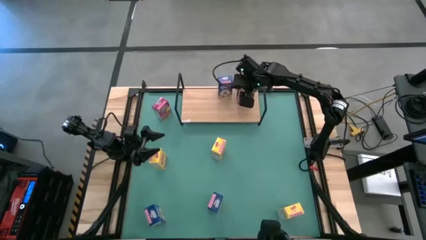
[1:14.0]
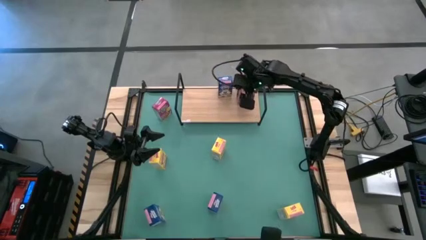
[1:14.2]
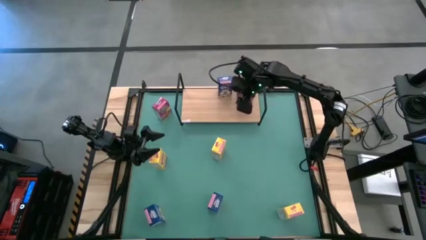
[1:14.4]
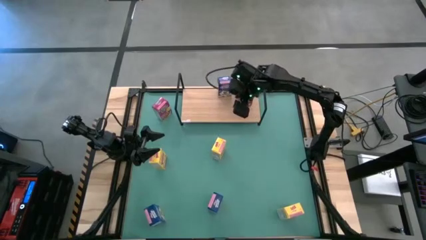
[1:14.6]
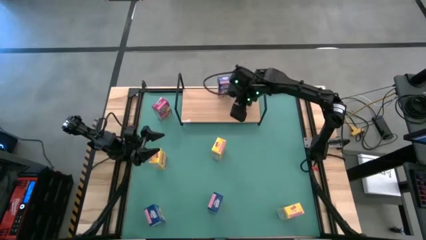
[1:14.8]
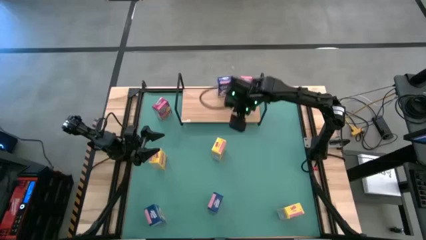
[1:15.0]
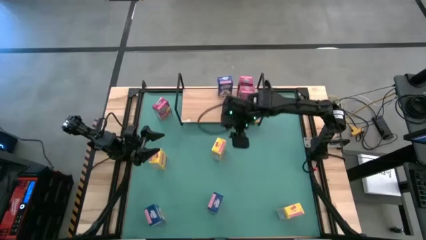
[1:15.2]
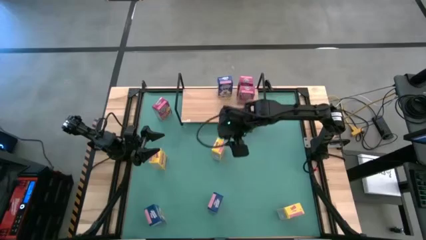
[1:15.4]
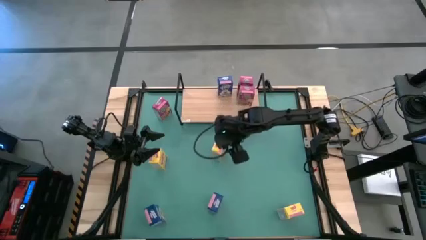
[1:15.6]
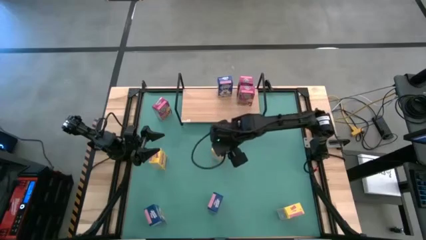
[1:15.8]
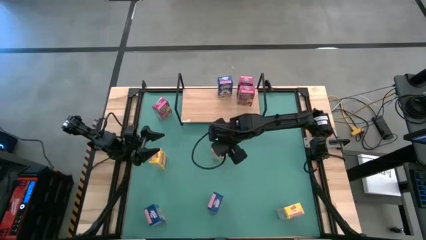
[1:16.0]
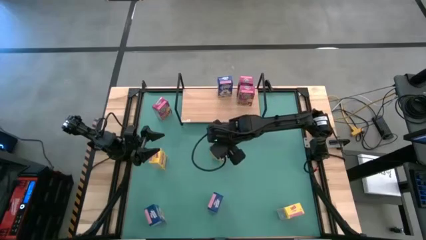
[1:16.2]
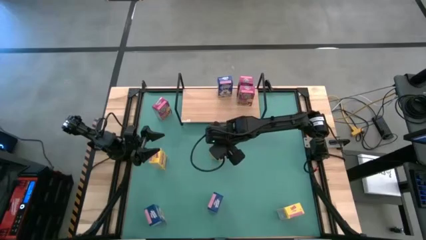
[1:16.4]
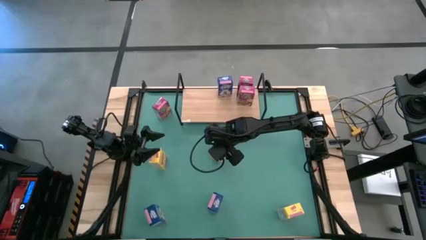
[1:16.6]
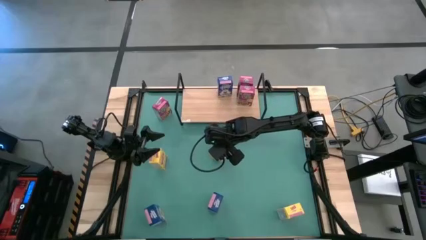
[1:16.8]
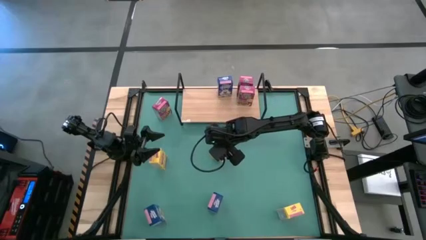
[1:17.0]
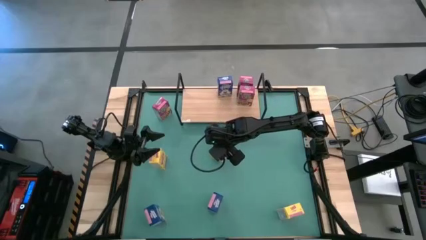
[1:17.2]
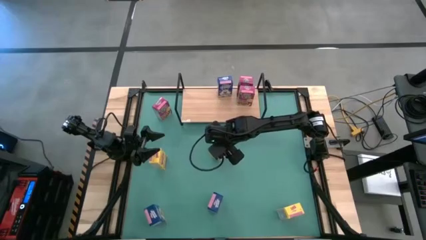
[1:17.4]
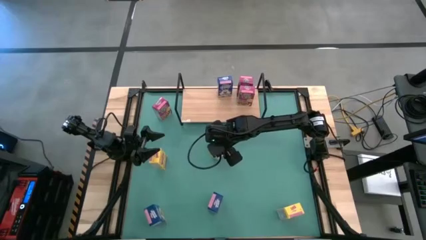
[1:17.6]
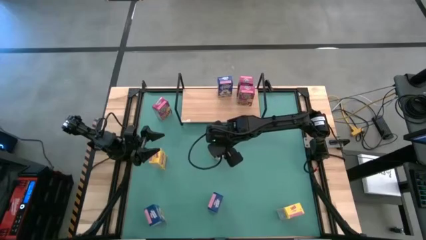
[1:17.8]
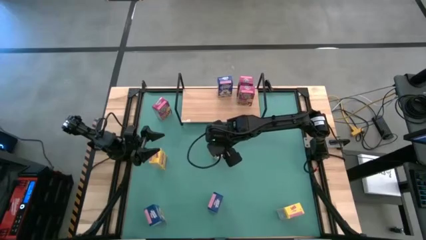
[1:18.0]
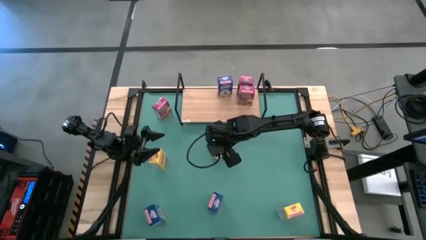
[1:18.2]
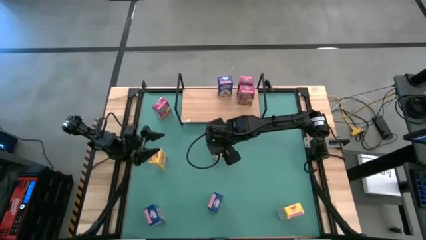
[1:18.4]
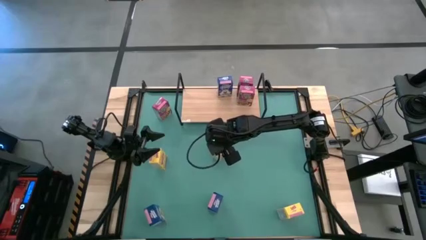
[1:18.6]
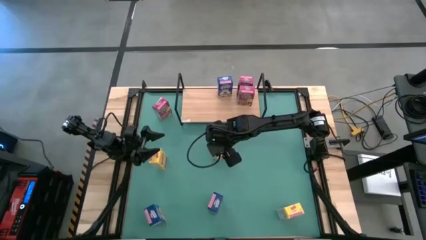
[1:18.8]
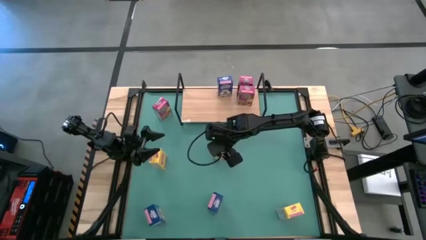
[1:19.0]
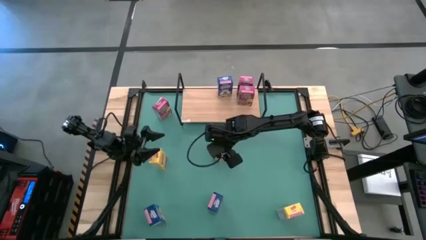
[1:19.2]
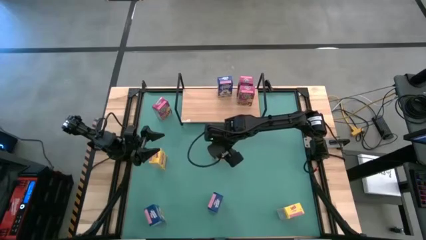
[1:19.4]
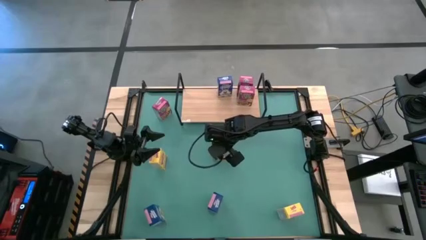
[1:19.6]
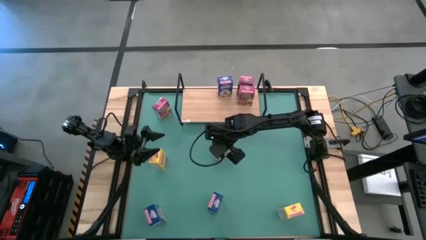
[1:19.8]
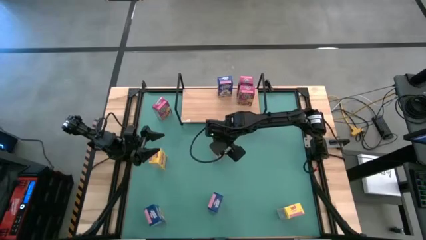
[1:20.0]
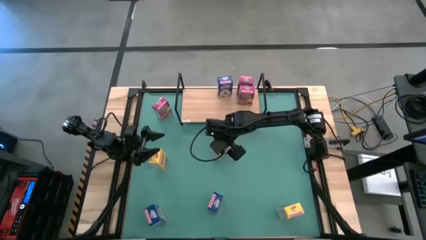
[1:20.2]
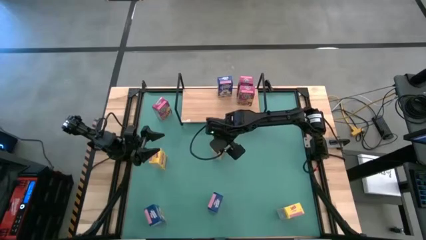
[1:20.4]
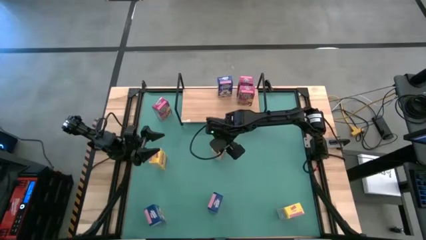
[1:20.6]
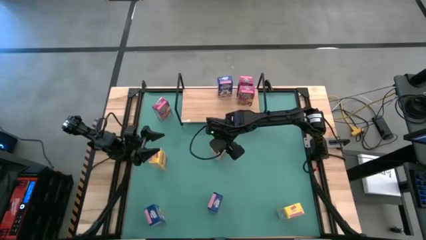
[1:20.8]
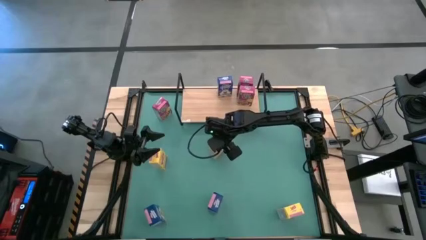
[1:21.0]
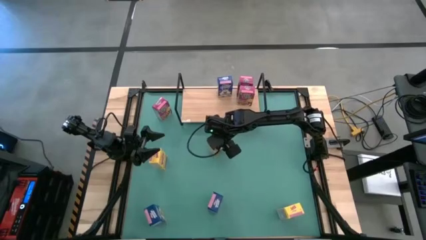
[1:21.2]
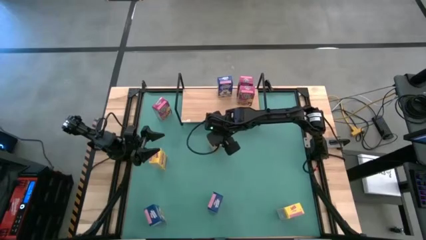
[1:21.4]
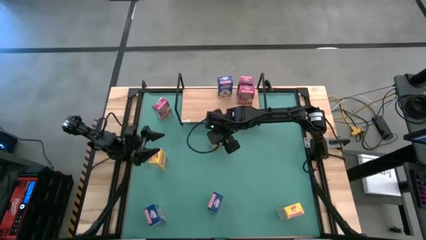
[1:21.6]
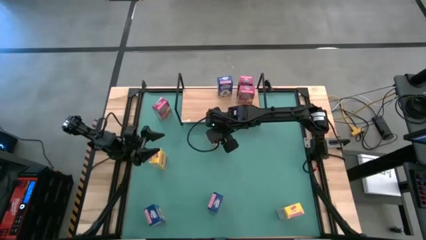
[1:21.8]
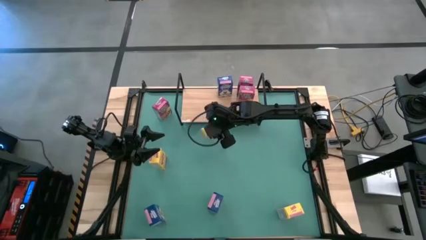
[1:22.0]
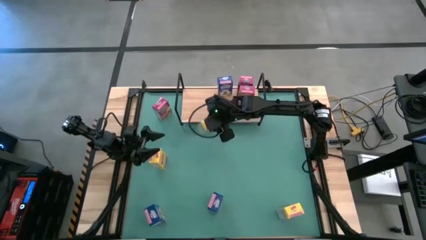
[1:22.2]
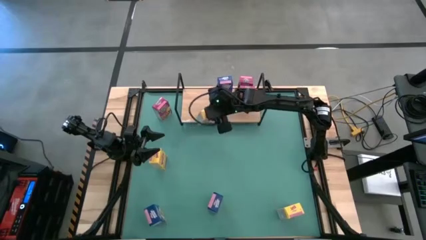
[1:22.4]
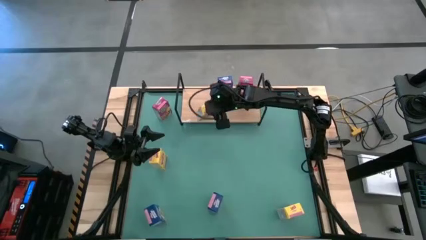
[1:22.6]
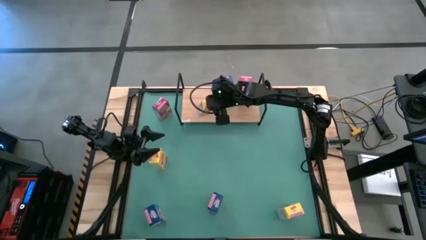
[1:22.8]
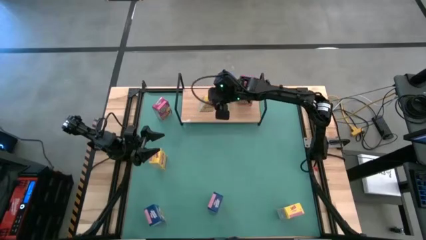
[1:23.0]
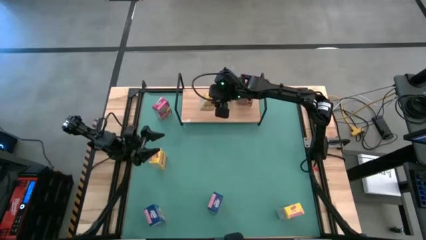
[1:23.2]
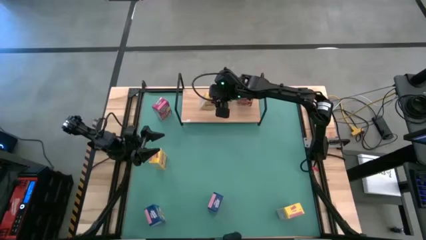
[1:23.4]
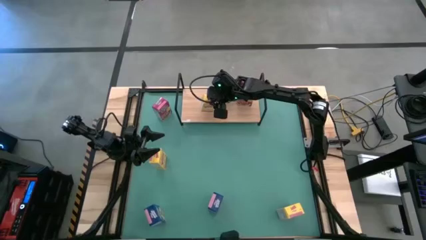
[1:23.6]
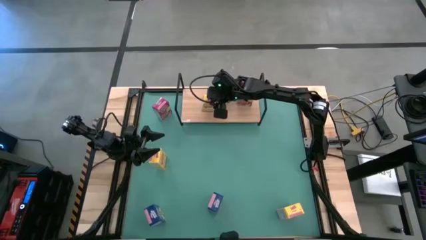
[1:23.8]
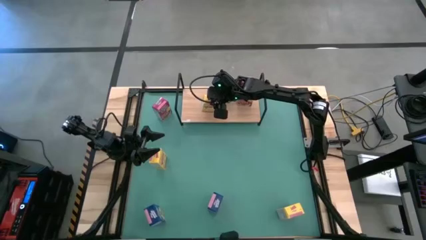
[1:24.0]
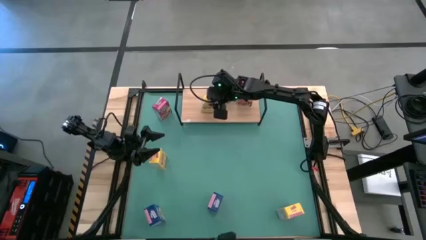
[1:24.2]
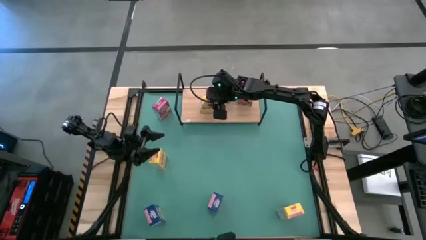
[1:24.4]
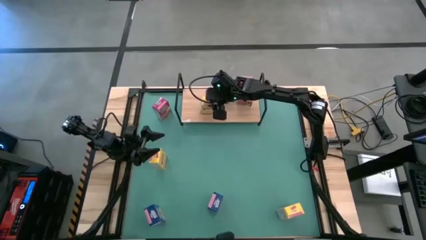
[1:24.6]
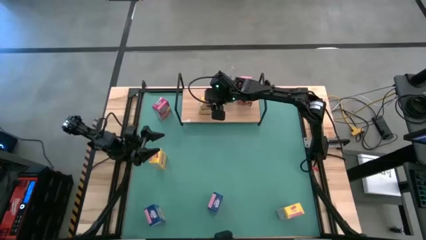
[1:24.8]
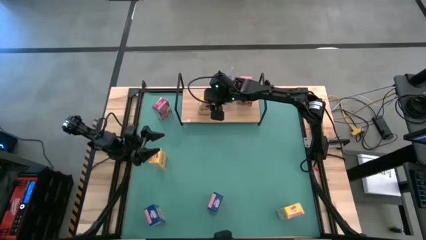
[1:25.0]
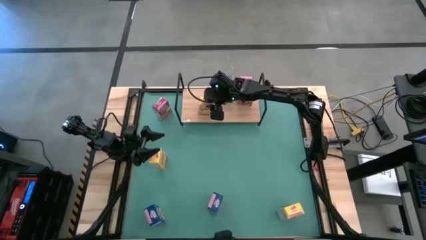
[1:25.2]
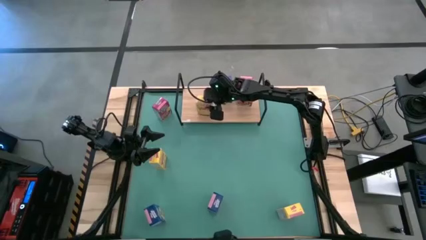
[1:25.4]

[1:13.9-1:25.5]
Task: Stack cereal on shelf
Put the top right yellow cereal box on the shelf

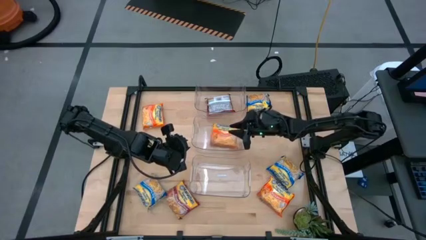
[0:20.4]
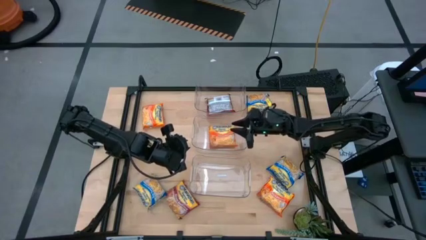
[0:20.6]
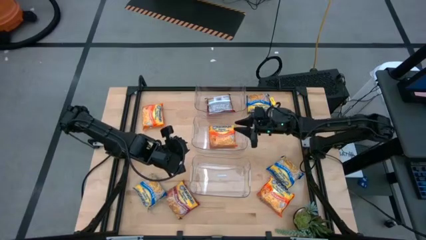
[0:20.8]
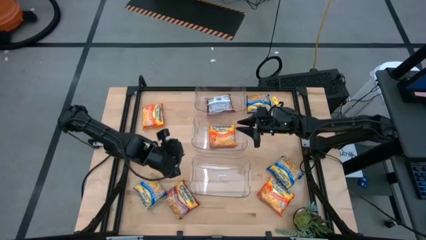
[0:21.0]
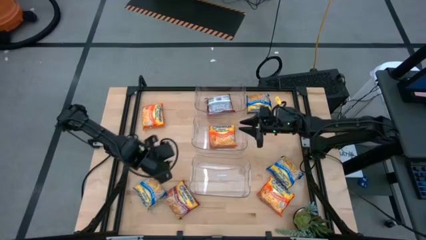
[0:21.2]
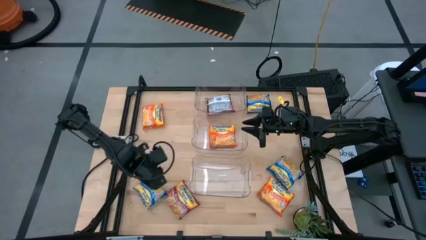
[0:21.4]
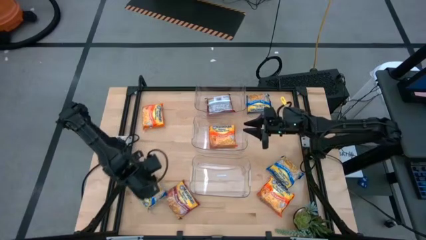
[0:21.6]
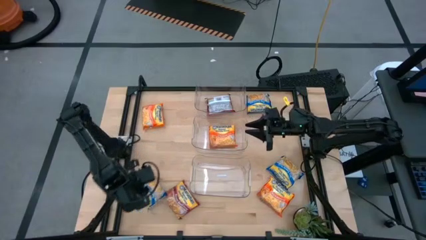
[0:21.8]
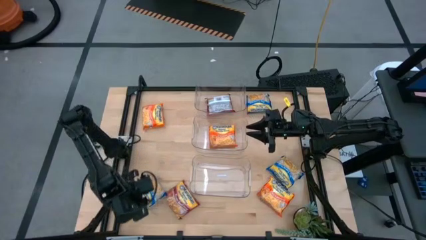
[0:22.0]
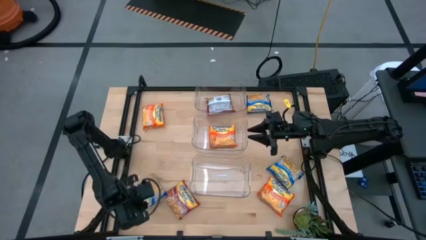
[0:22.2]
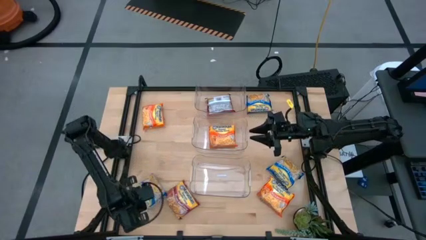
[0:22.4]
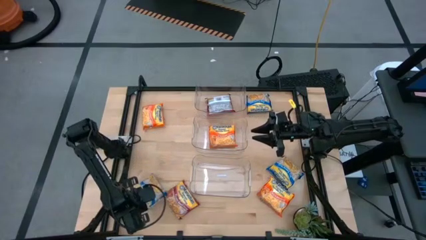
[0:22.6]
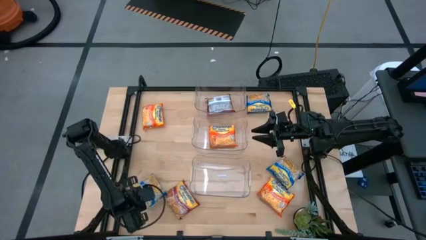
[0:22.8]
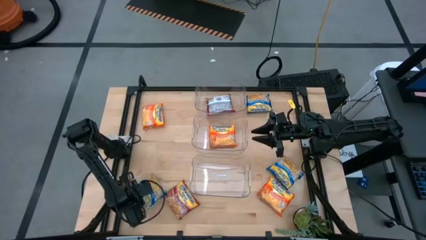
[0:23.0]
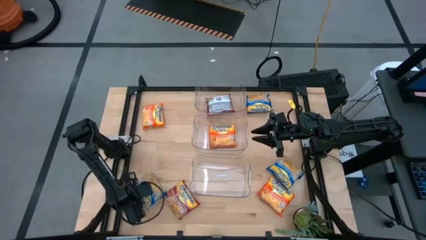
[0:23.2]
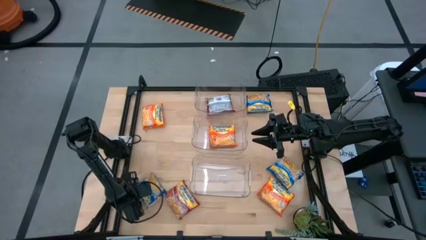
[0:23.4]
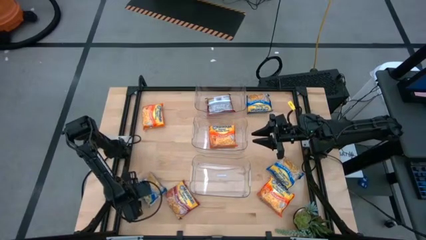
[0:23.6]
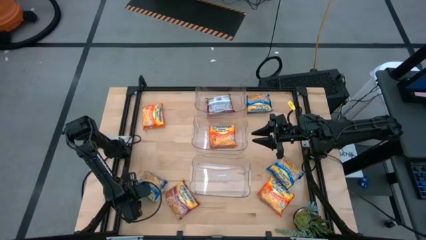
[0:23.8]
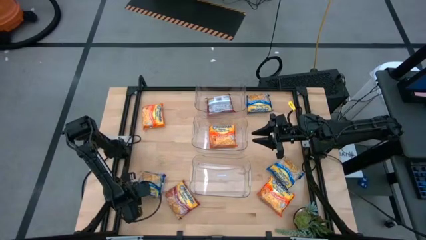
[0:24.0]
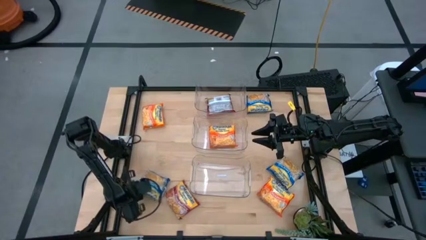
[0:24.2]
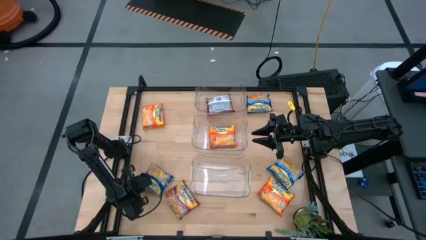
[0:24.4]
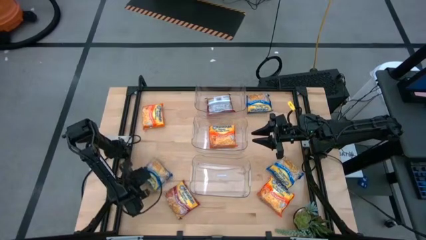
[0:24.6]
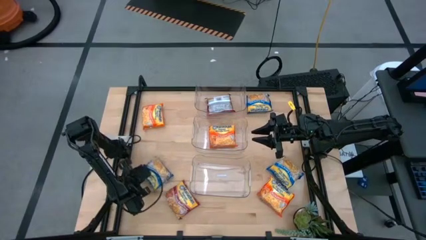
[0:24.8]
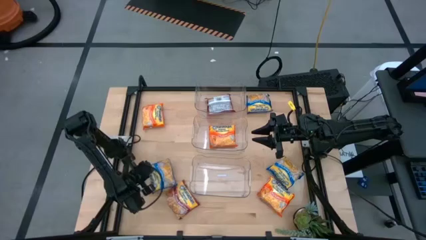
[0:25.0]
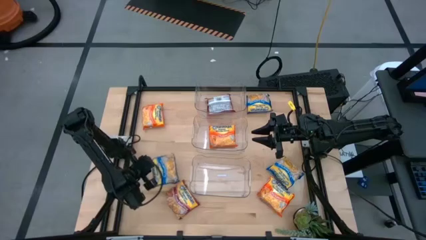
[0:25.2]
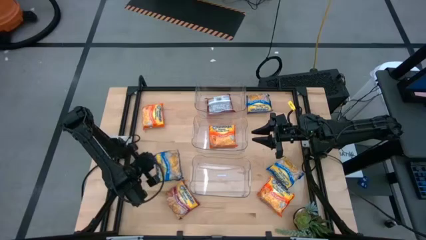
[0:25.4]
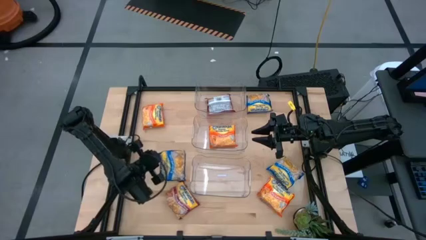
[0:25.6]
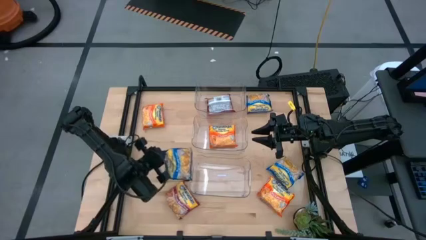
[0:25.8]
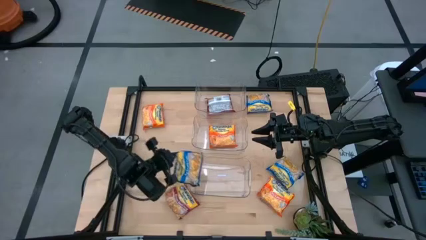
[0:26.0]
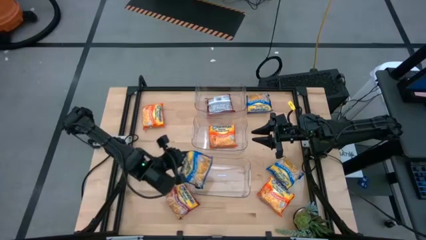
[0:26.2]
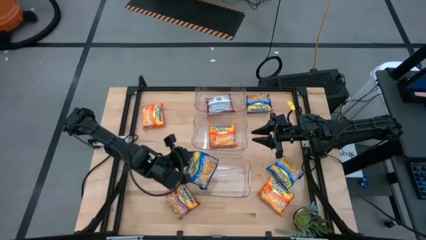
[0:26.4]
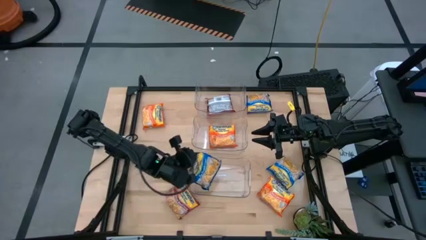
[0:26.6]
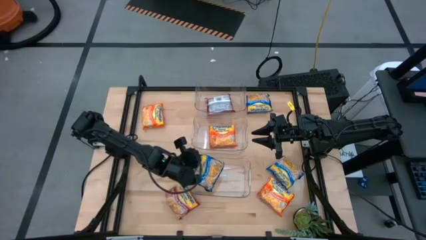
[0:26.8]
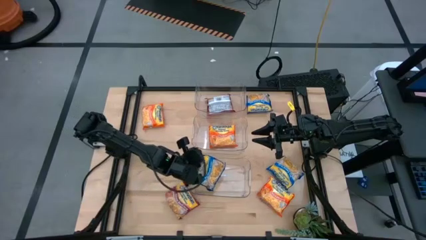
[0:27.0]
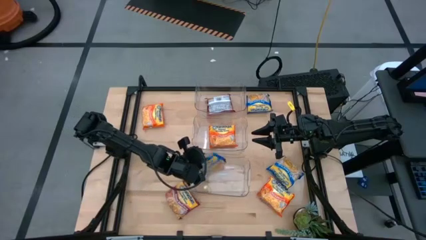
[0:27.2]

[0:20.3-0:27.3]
Task: Sort Maruchan noodles
Put the bottom left blue noodle pack into the bottom transparent bin
